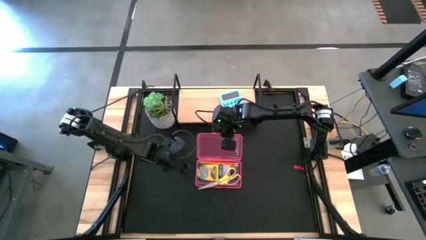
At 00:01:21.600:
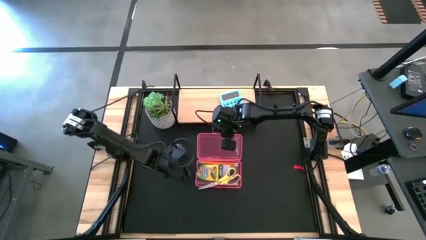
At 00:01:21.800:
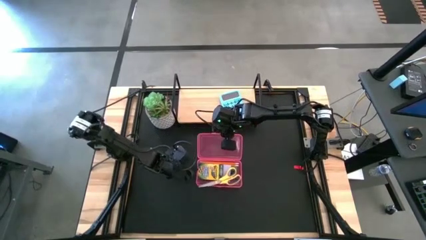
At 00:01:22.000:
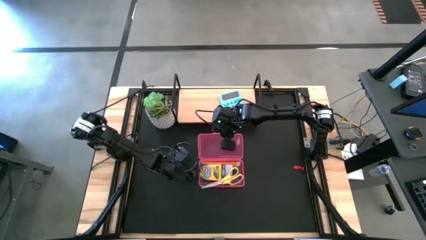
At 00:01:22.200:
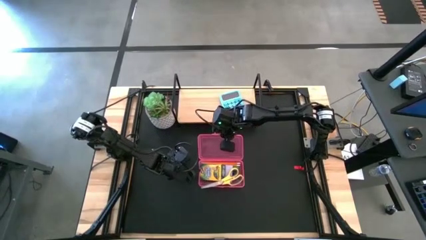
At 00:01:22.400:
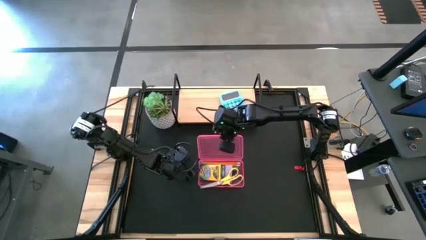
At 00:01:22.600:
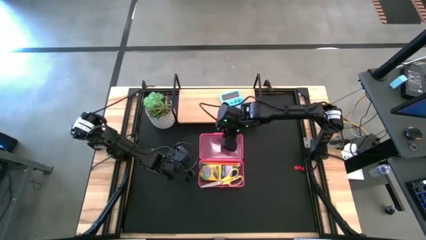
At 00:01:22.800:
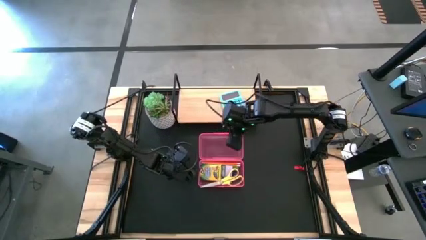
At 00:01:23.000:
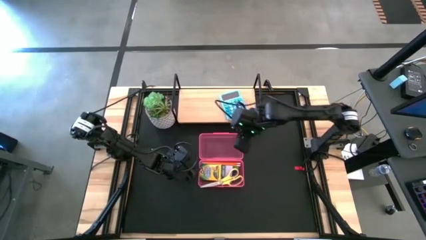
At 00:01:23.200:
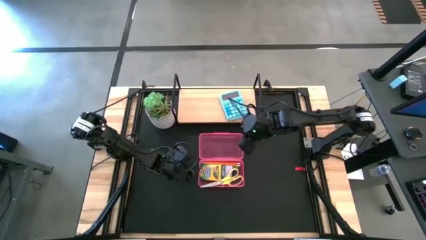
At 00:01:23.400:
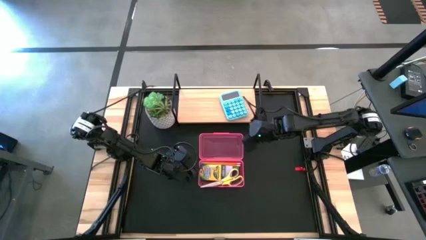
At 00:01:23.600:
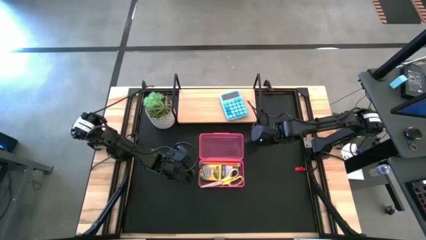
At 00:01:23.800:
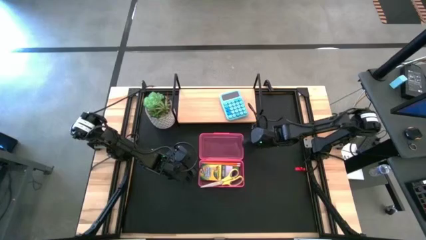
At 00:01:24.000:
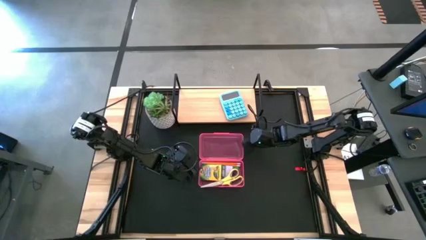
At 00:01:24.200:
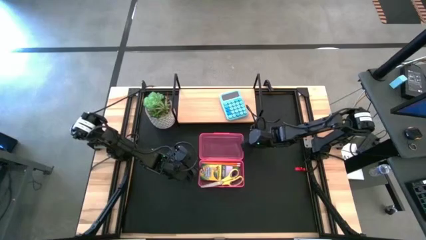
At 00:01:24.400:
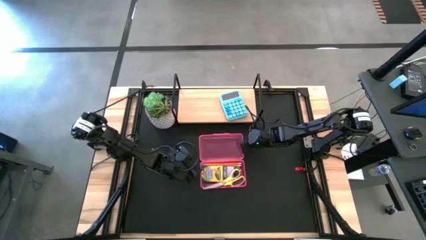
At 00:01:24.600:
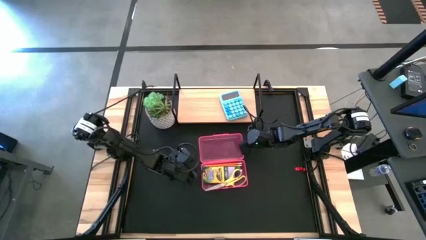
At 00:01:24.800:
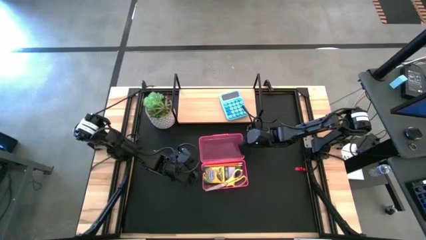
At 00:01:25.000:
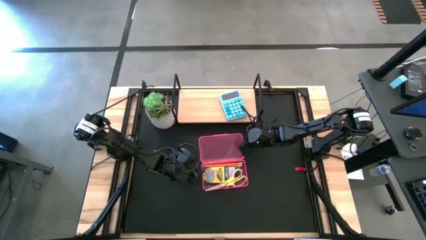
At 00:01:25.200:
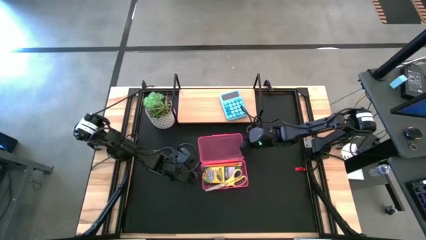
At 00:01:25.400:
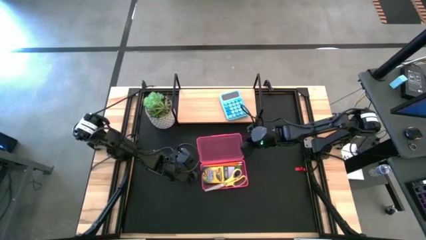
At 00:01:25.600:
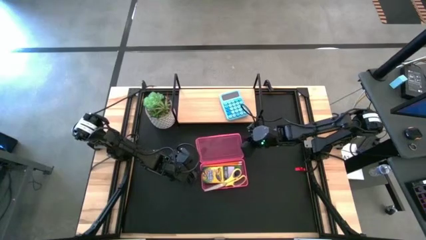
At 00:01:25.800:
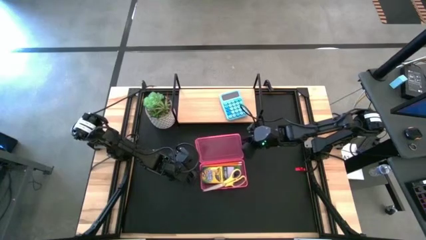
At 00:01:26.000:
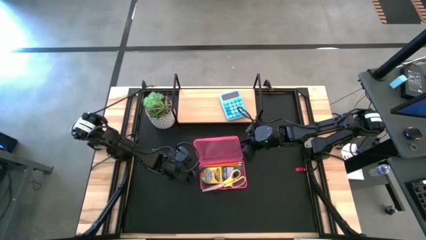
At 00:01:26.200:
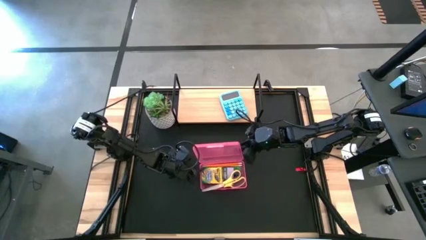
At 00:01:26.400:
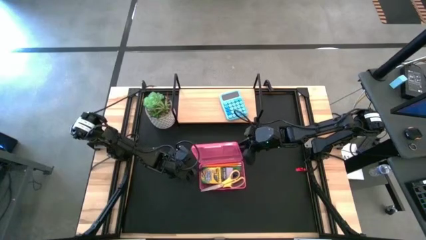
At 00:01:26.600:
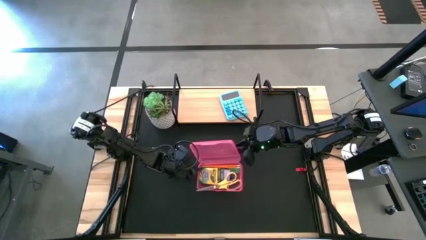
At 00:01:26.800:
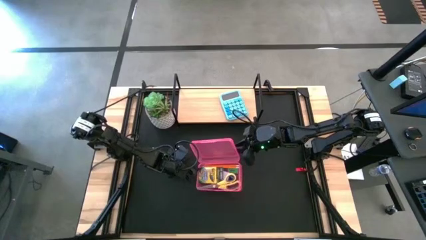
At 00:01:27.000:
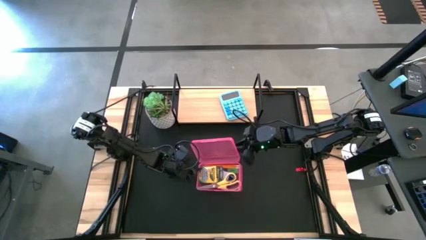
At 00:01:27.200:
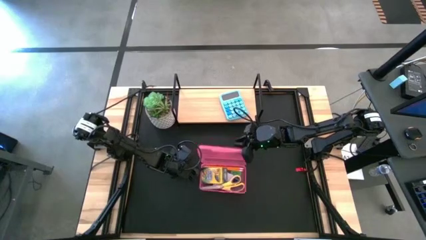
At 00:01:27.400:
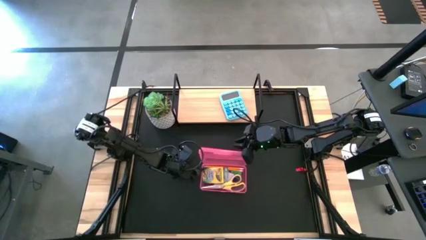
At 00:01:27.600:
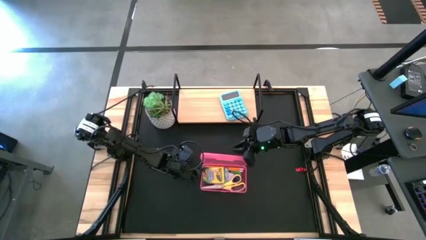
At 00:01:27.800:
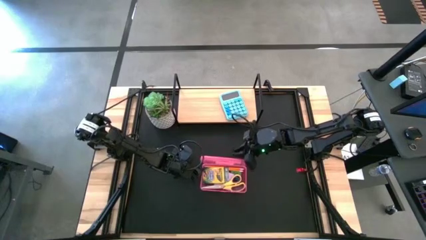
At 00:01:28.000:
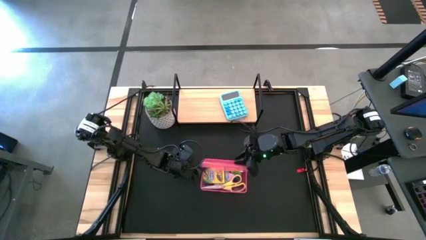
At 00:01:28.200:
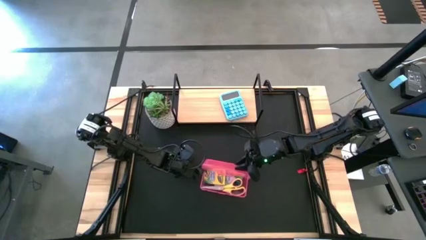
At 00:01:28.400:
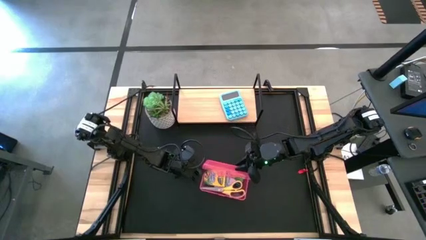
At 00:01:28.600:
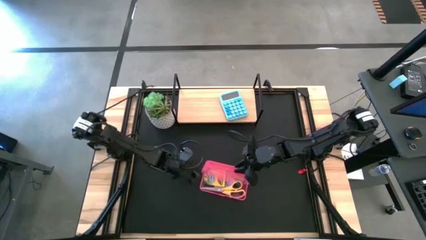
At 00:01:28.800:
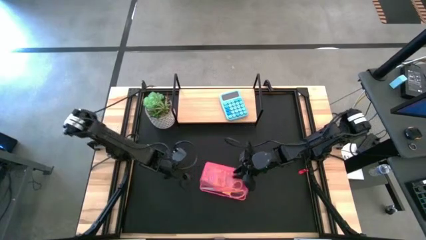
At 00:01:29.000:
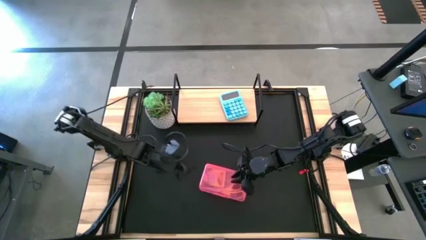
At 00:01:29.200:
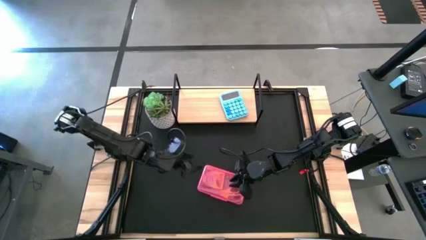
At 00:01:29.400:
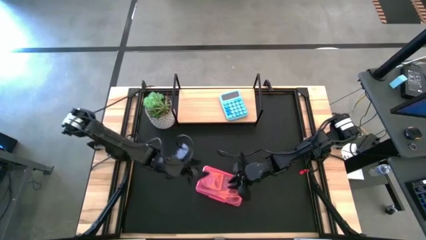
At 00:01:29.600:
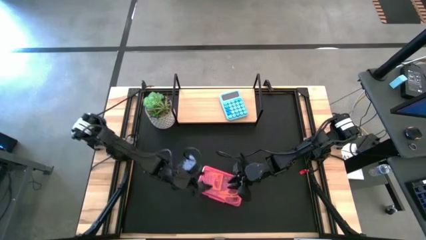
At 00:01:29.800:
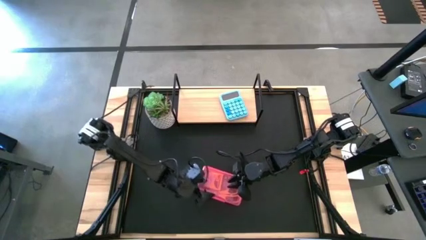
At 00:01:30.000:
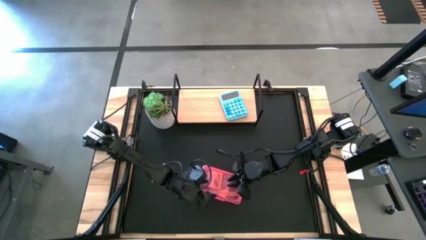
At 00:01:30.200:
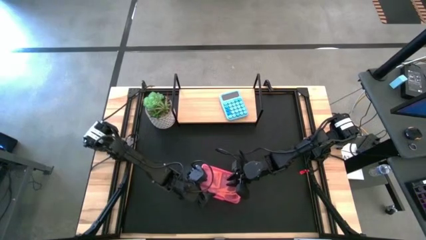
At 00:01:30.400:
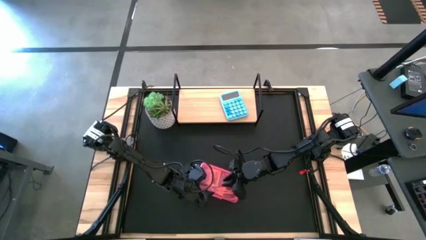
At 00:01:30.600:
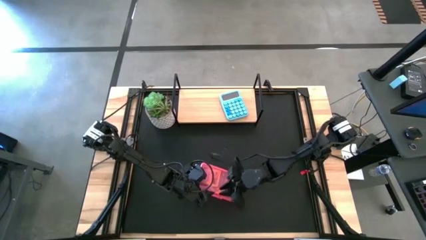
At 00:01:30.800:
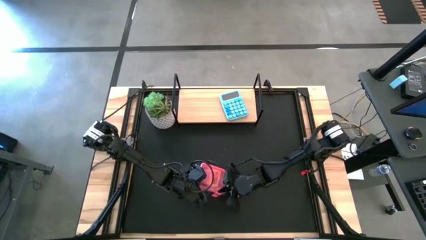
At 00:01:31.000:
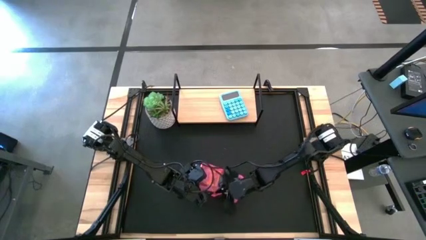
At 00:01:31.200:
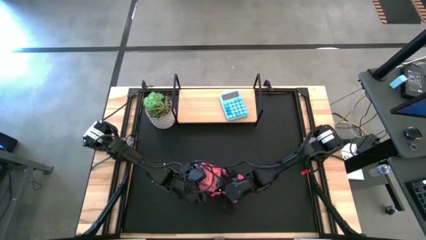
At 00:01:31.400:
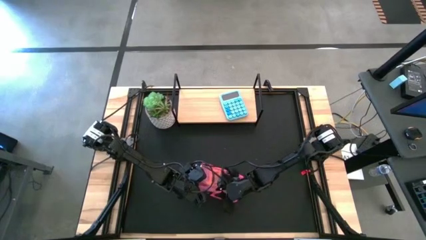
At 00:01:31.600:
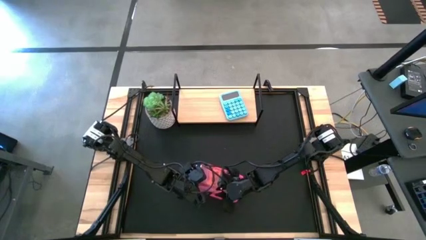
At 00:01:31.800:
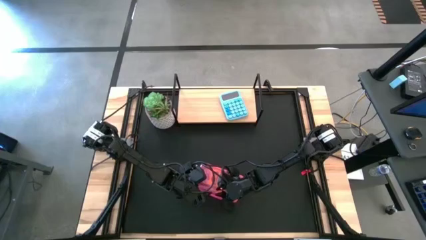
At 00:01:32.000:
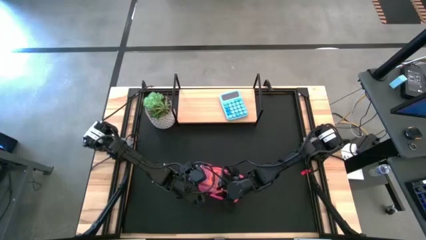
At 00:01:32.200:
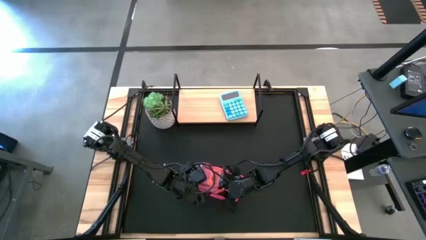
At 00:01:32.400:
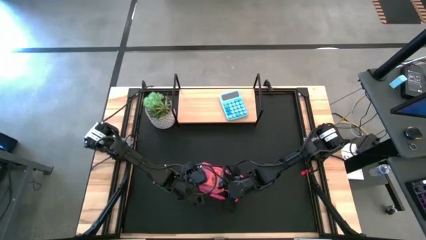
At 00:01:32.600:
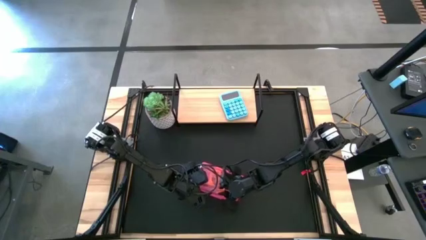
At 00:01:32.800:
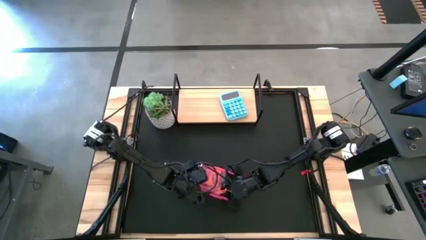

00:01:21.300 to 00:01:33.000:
Task: Pack school essentials
Close the red supply box

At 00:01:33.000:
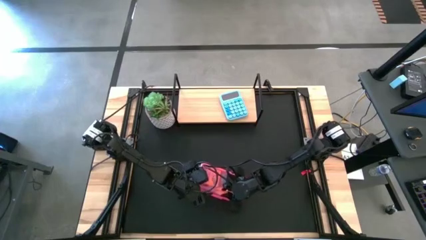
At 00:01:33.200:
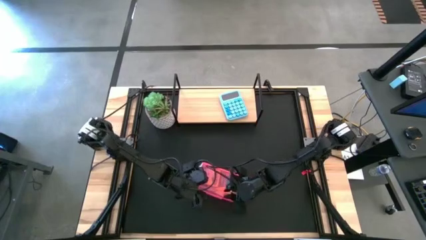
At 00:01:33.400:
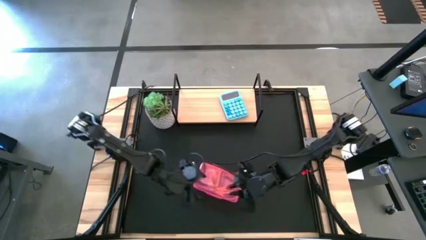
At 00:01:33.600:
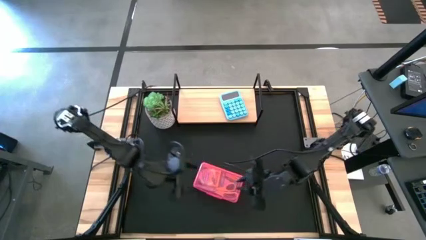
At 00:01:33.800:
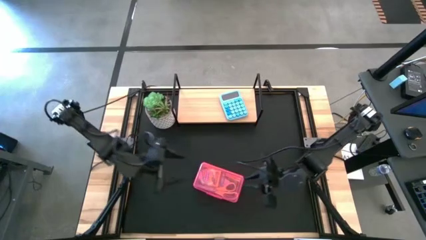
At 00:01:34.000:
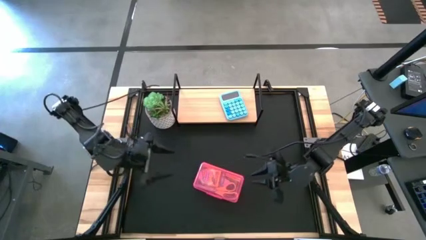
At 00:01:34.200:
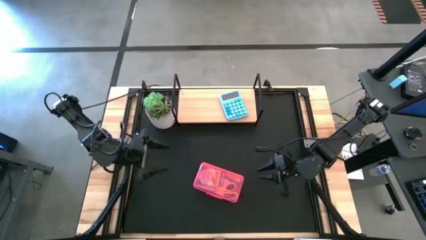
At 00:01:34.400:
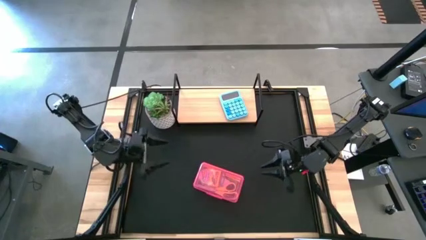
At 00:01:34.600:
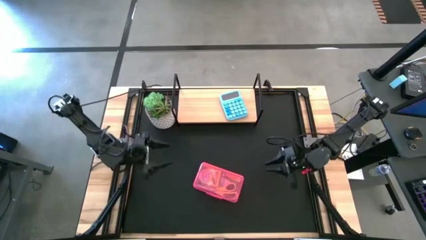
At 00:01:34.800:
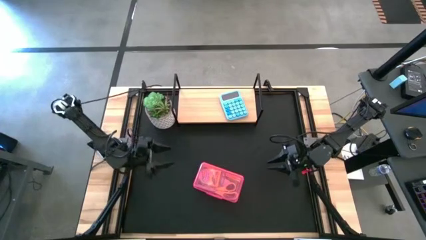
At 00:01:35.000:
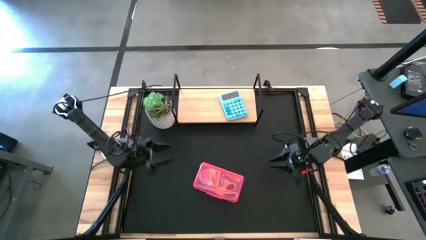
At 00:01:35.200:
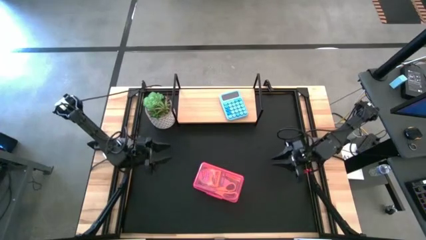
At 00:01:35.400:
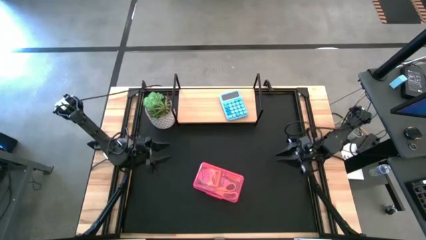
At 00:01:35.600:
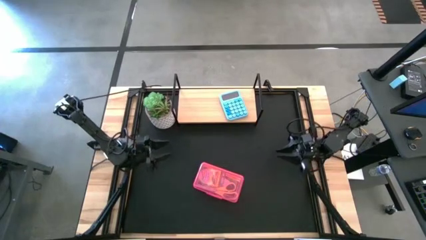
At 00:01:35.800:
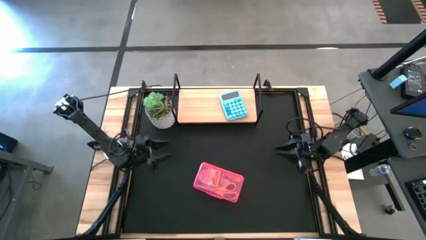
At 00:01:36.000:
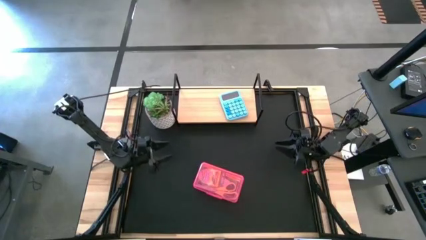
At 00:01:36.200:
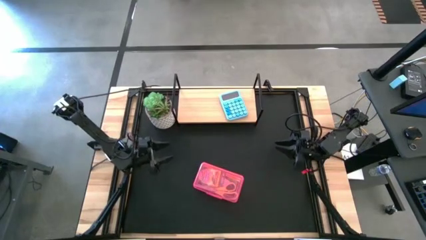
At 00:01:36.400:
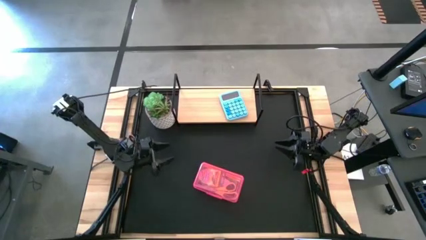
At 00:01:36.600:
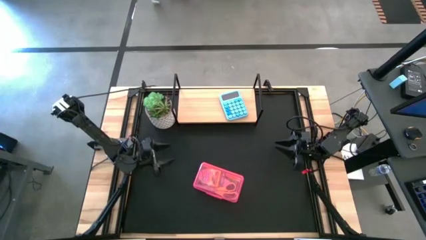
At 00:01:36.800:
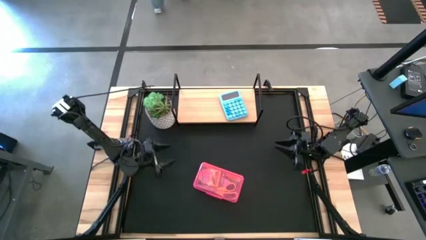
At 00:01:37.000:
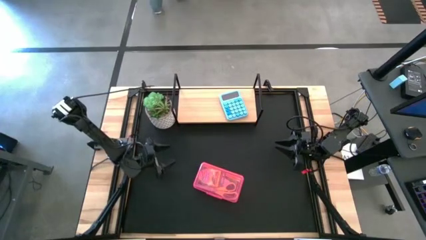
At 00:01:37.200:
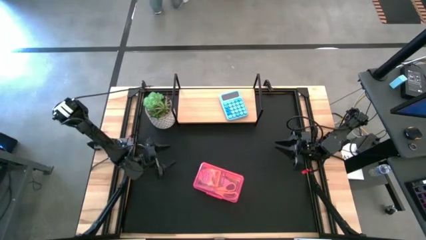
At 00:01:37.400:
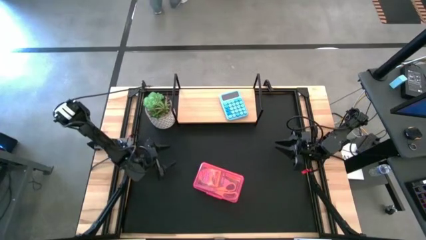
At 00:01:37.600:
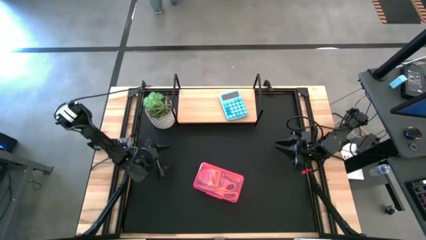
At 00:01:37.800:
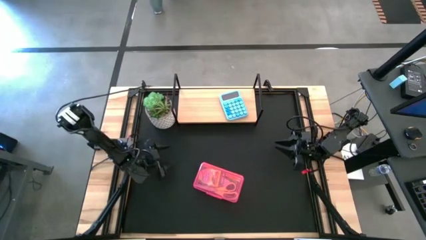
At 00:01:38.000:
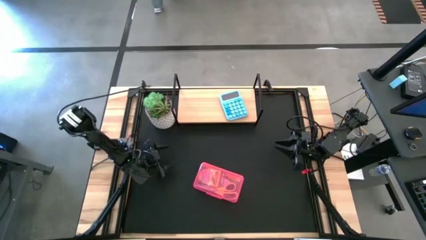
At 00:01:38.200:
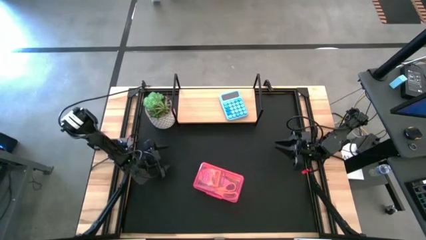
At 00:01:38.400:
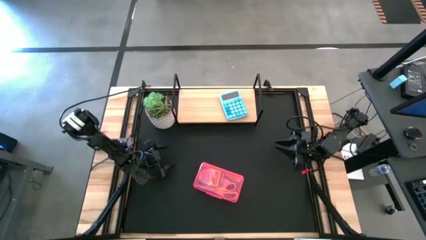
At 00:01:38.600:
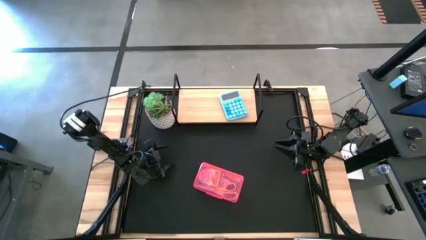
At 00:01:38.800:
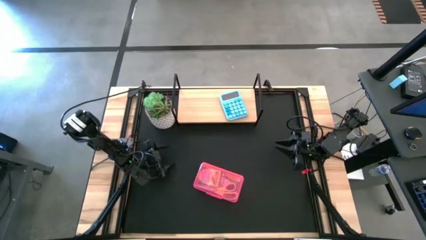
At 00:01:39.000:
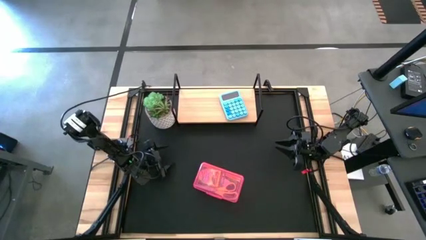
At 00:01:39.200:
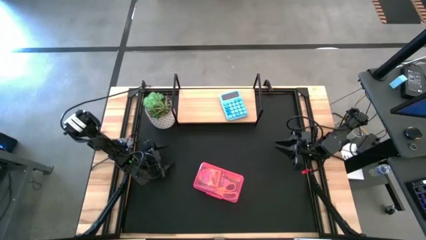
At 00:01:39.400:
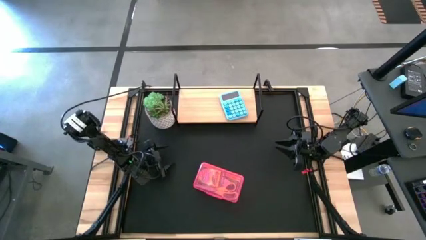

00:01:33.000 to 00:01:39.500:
Return to Home Position
